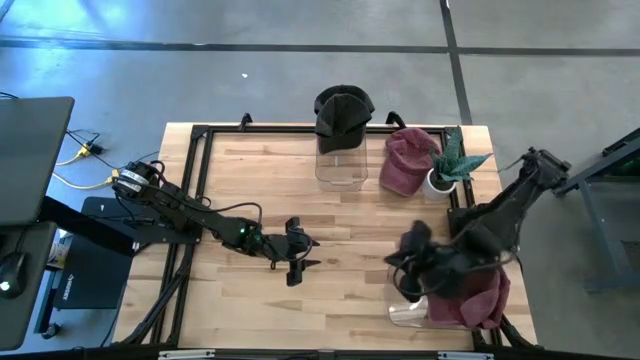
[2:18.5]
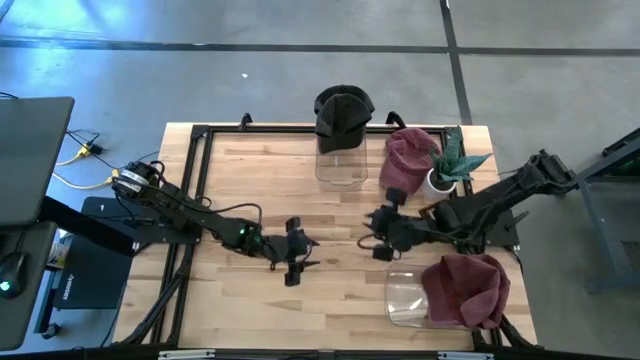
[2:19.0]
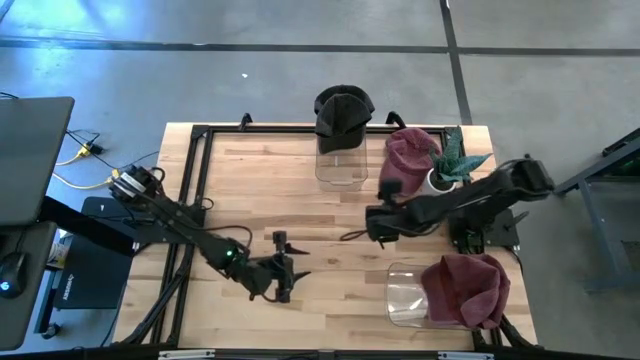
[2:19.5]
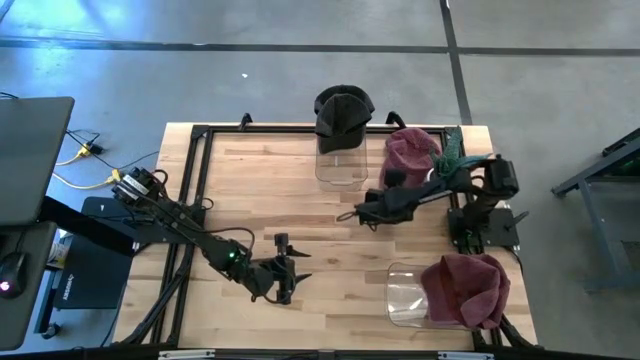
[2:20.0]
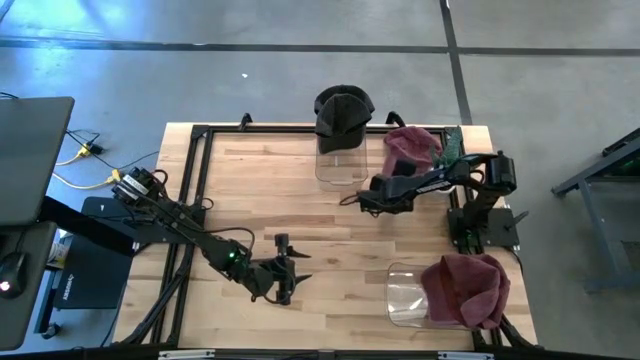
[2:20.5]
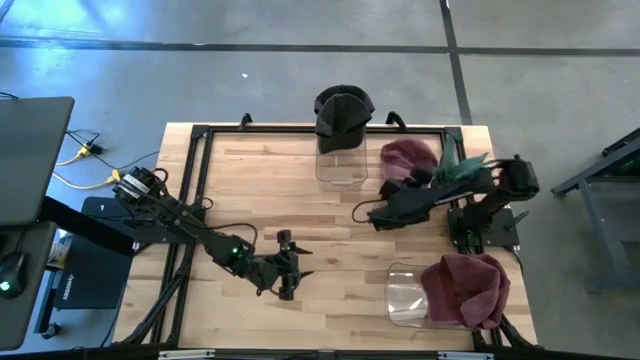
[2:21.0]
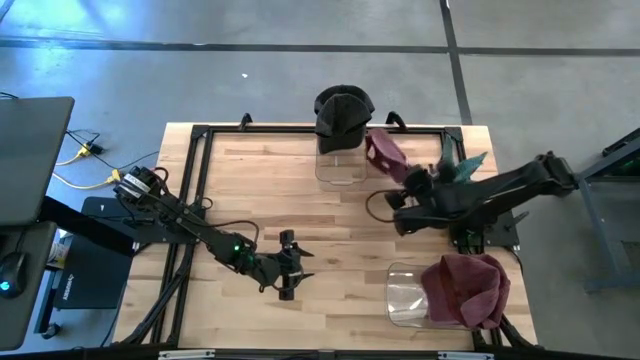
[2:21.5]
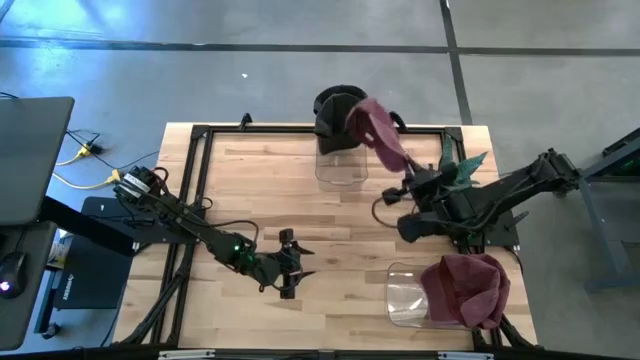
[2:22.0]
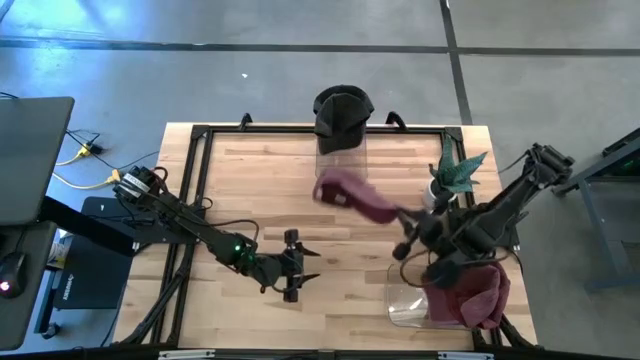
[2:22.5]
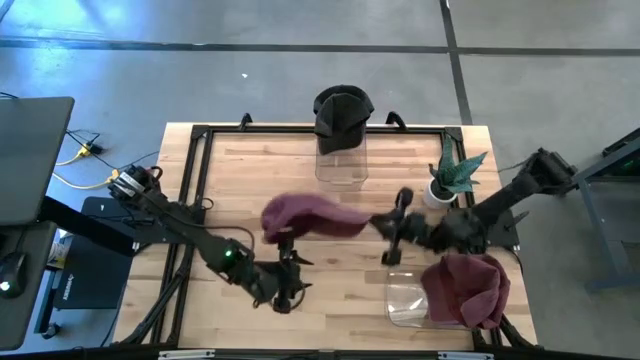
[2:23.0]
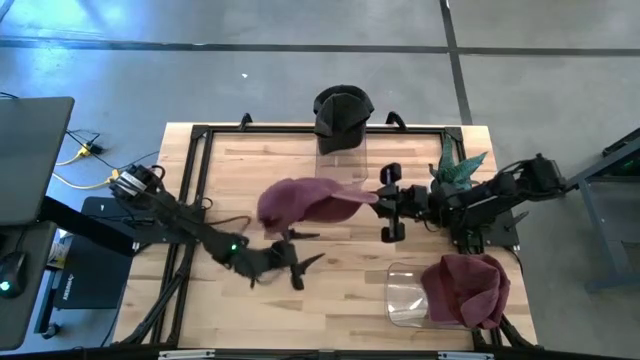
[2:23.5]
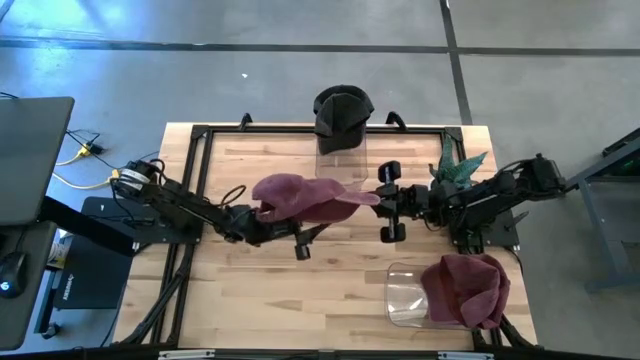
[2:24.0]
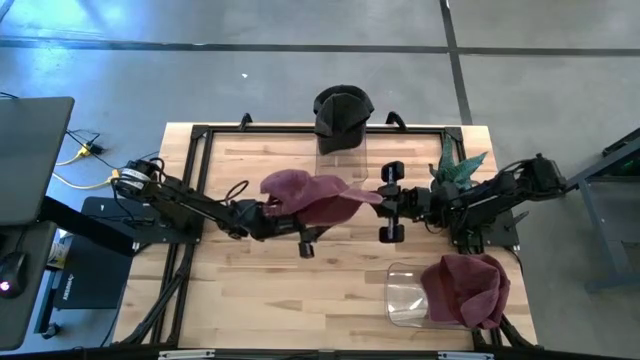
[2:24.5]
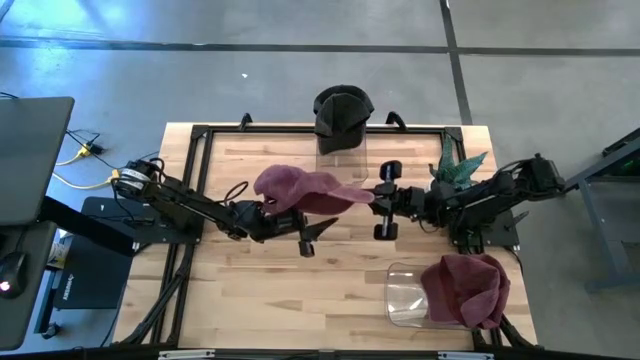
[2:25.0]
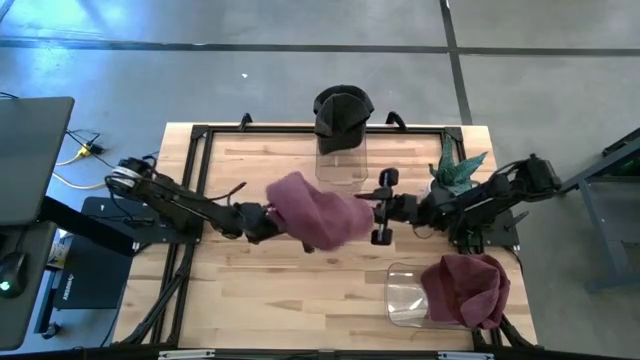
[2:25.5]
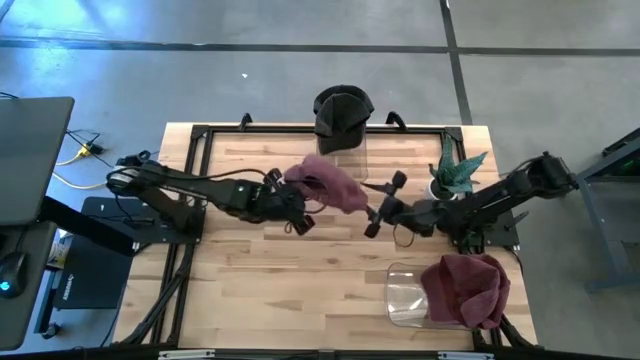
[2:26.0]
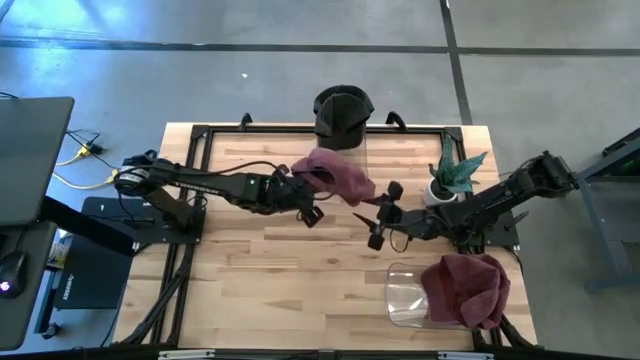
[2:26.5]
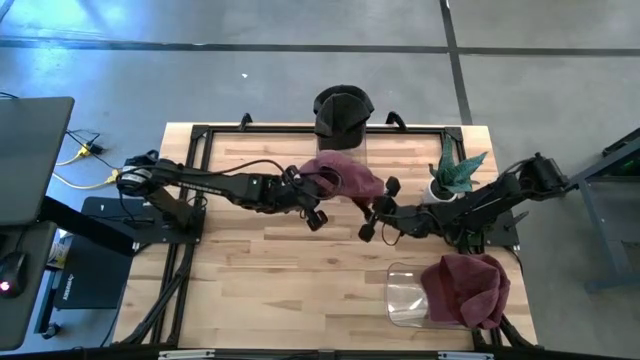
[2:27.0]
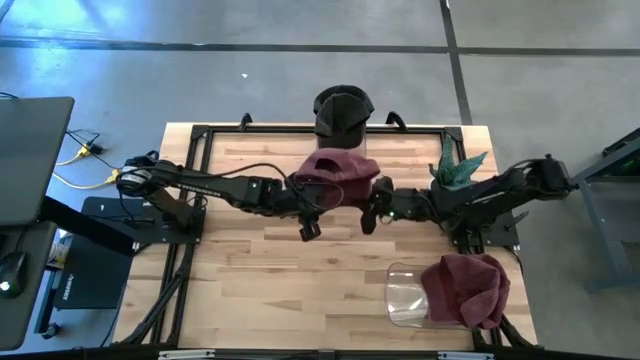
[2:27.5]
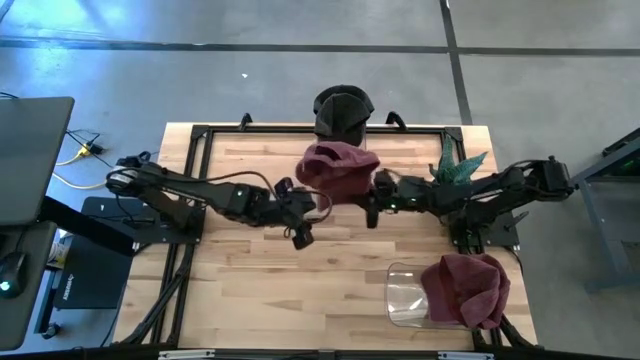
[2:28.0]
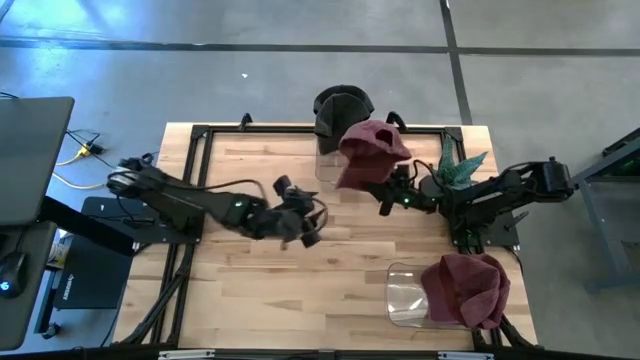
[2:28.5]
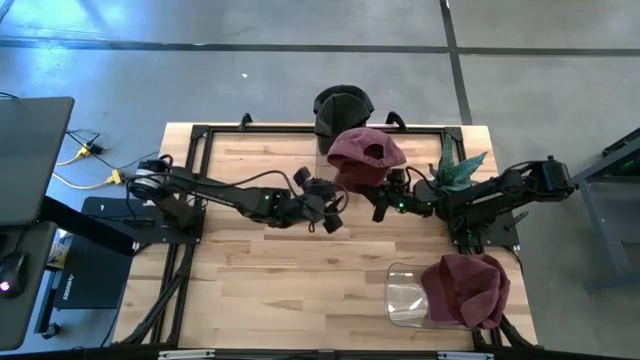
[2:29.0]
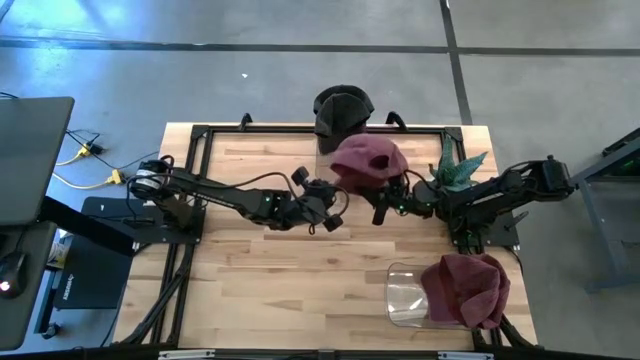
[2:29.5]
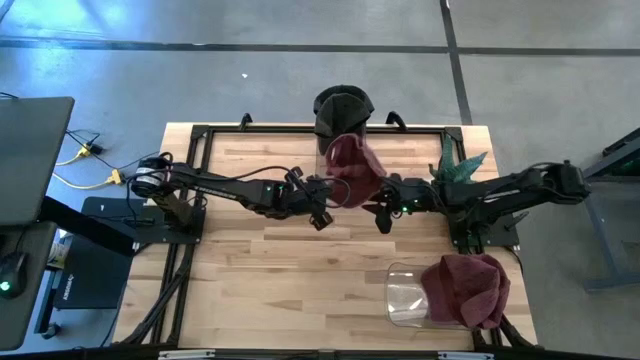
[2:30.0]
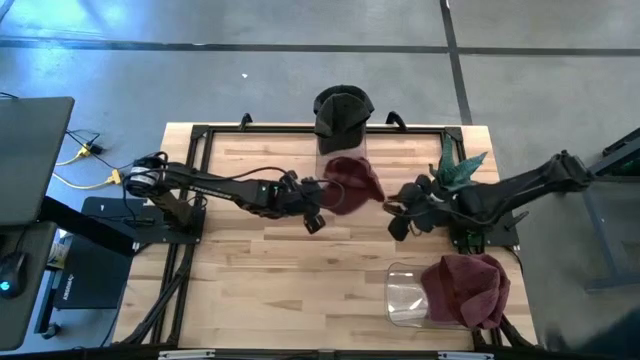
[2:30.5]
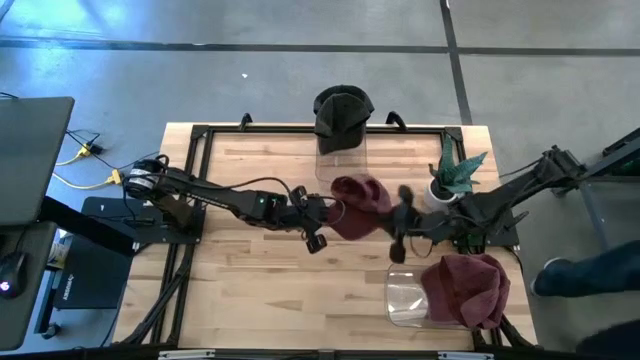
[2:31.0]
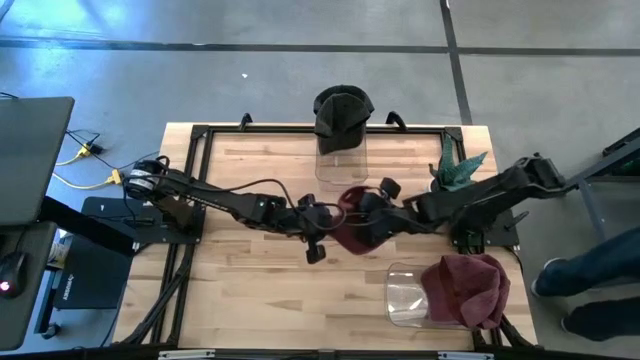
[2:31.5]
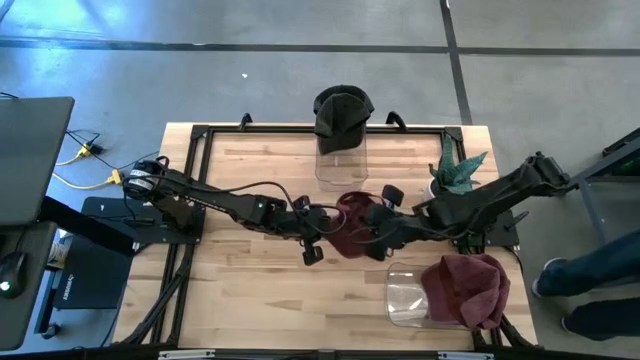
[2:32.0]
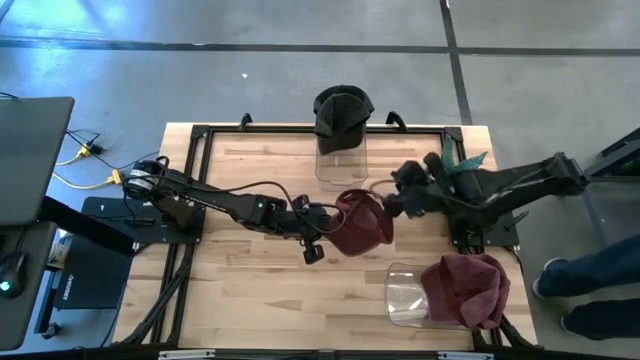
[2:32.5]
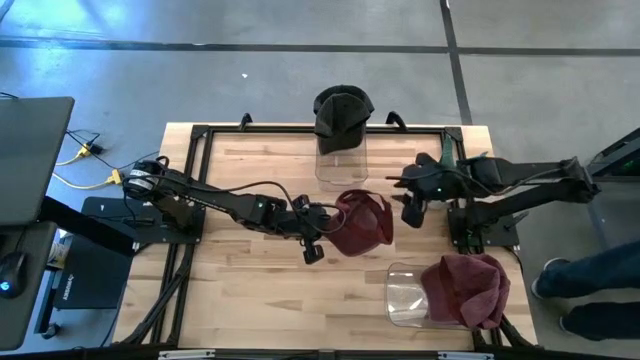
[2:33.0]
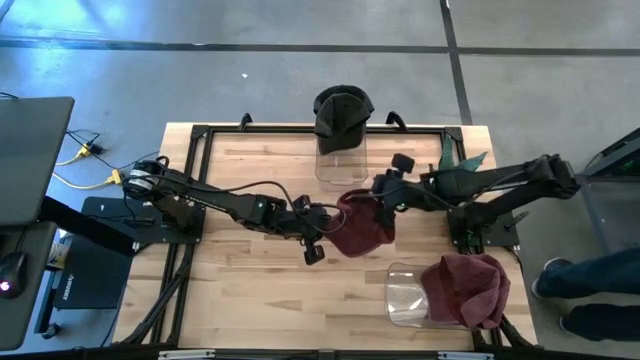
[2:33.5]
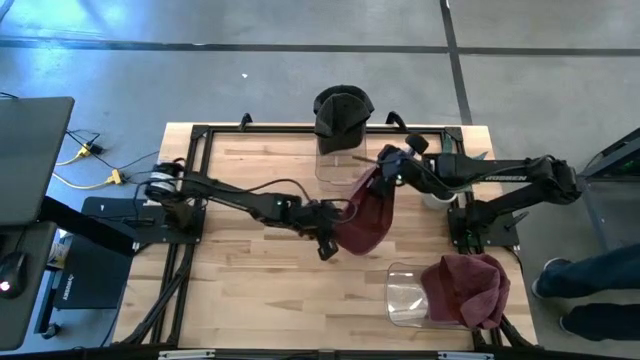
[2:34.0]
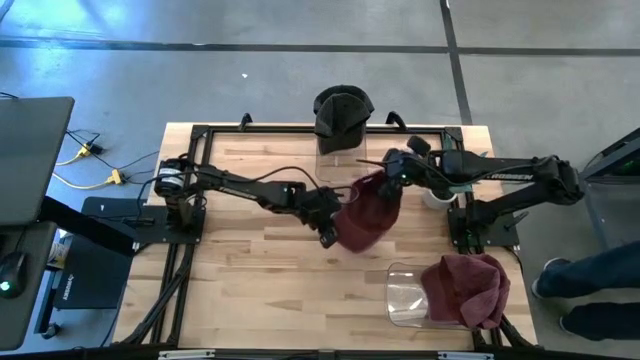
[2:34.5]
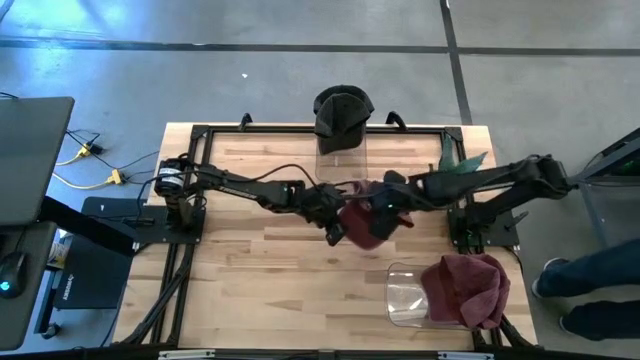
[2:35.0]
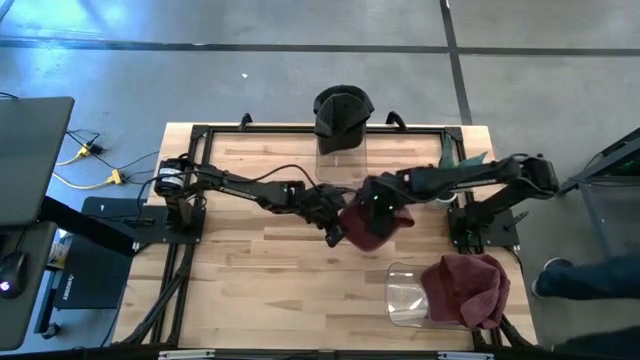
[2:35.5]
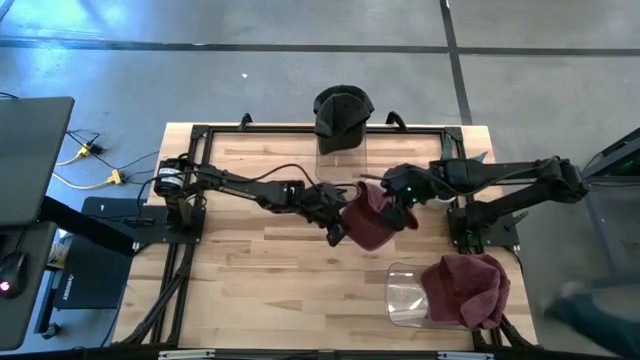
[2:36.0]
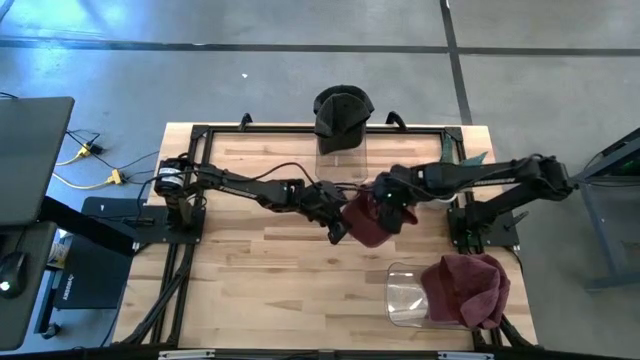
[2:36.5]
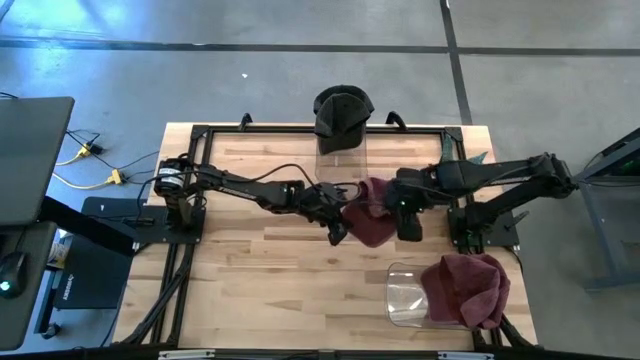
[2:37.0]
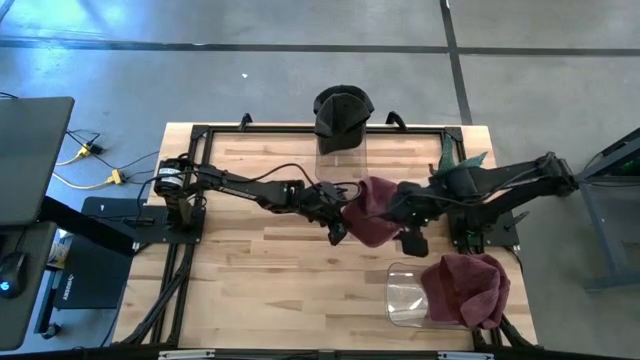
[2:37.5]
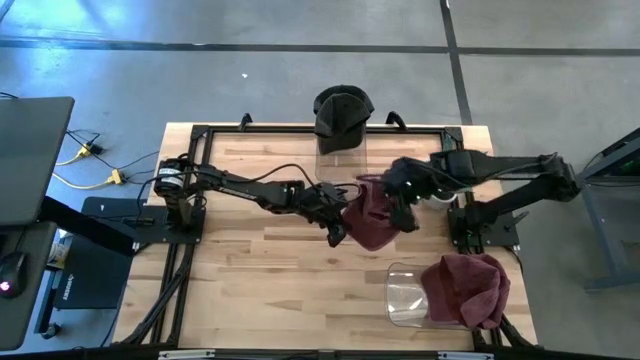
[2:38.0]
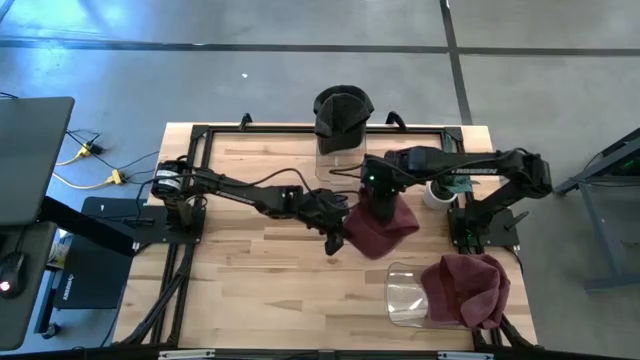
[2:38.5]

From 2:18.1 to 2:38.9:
Task: Pick & Place hat
Put the red cap into the bottom transparent bin

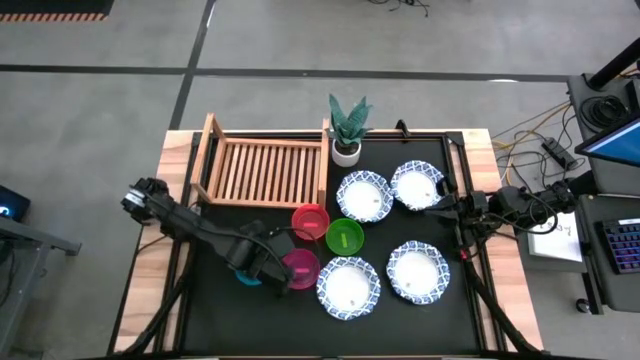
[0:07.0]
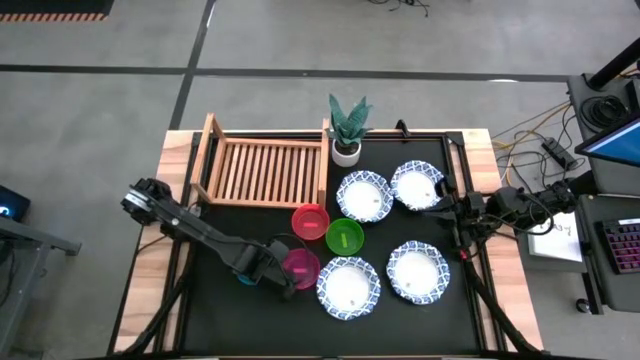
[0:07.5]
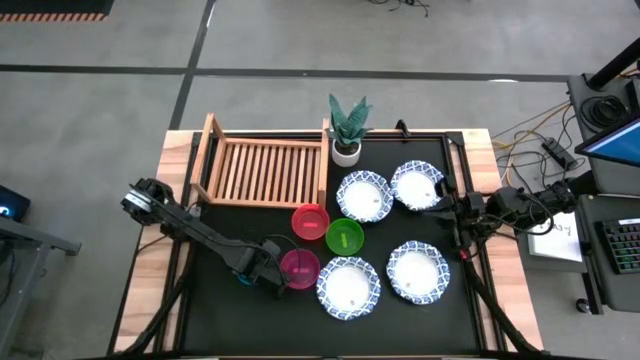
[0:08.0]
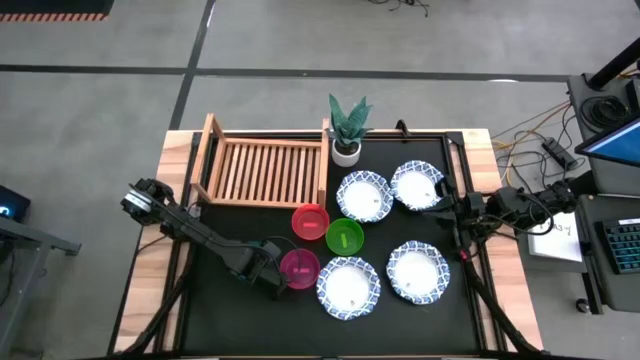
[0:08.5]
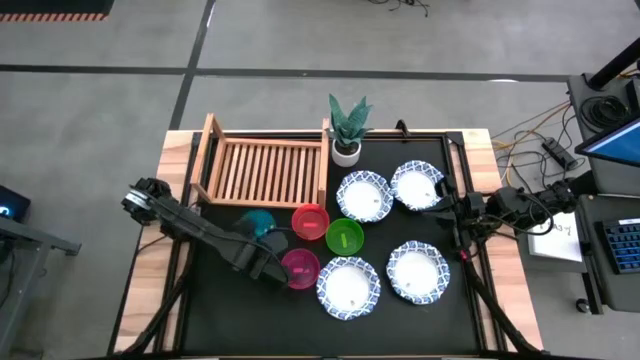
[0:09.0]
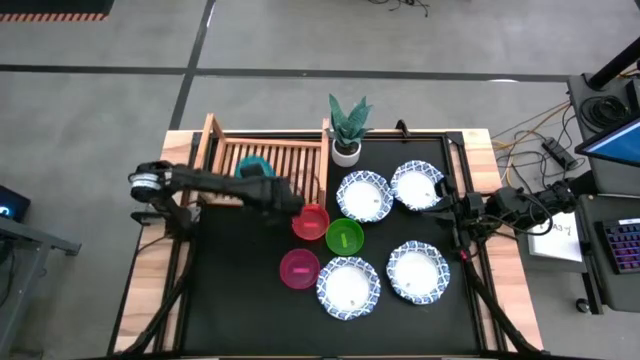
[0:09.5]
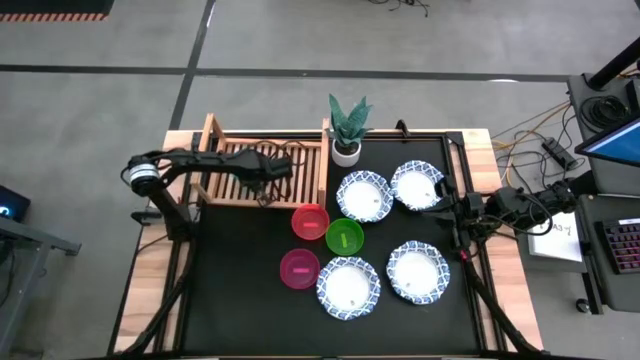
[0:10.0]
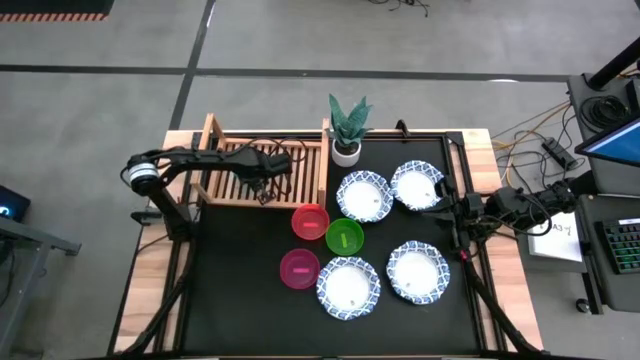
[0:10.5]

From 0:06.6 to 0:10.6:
Task: Place and stack bowls onto a shelf
Put the blue bowl on the shelf
